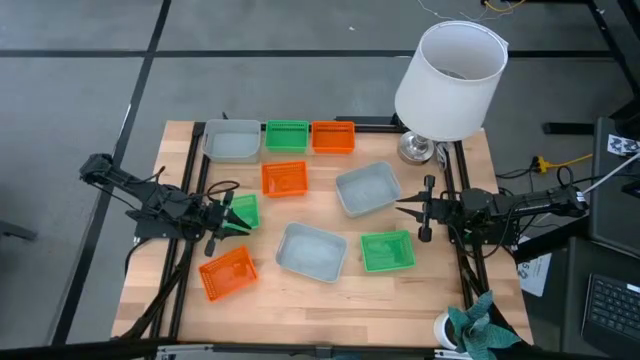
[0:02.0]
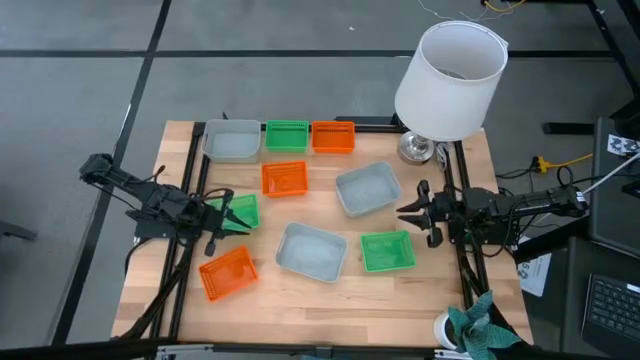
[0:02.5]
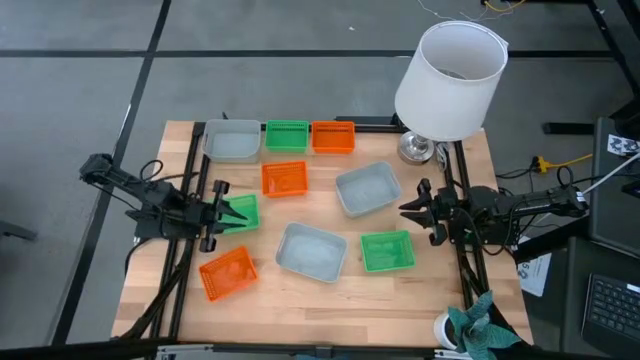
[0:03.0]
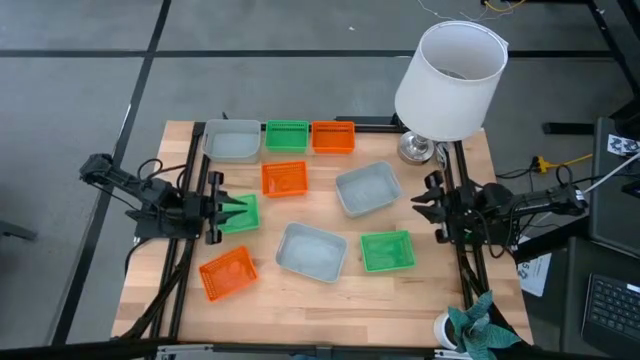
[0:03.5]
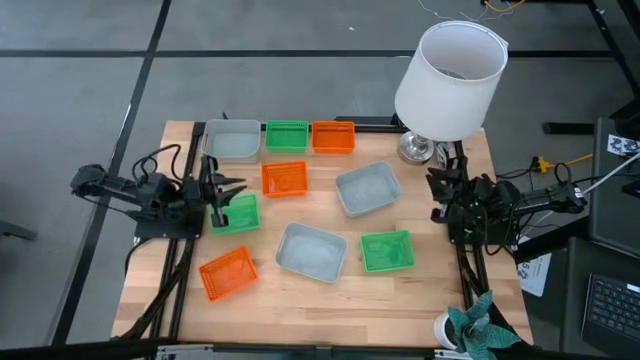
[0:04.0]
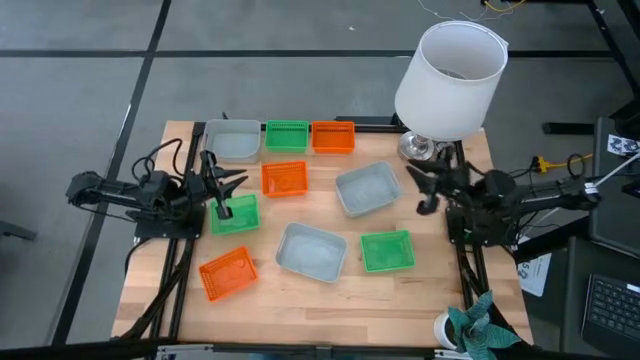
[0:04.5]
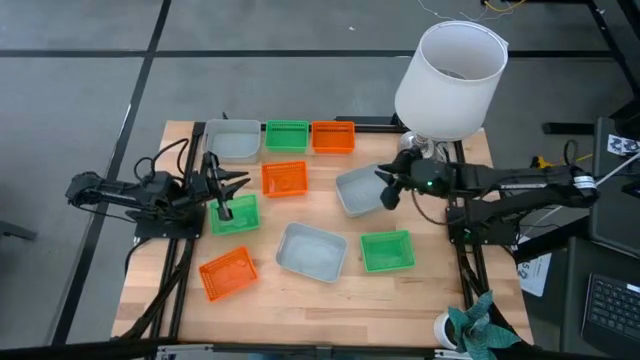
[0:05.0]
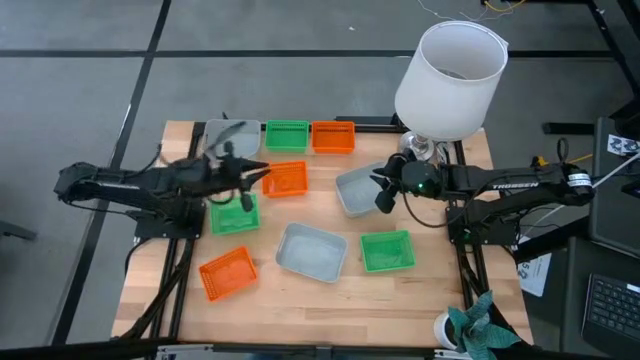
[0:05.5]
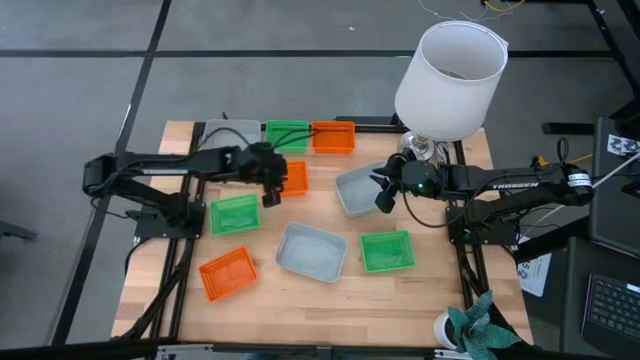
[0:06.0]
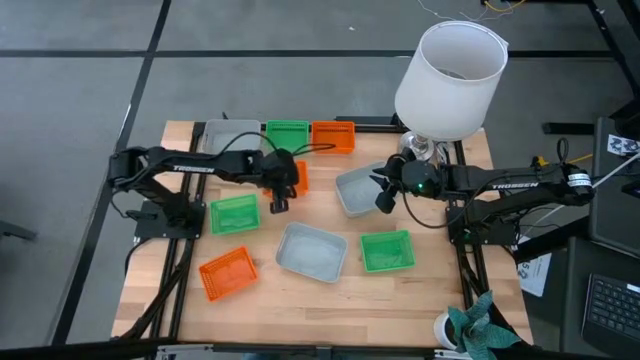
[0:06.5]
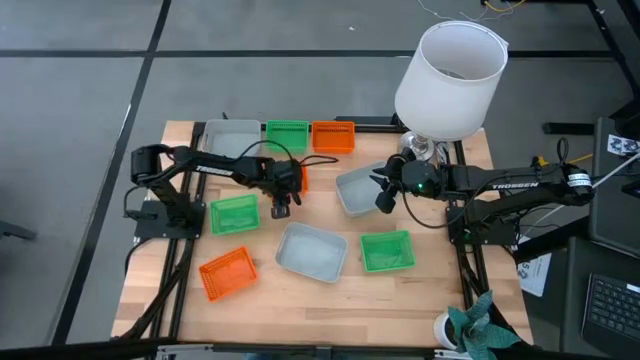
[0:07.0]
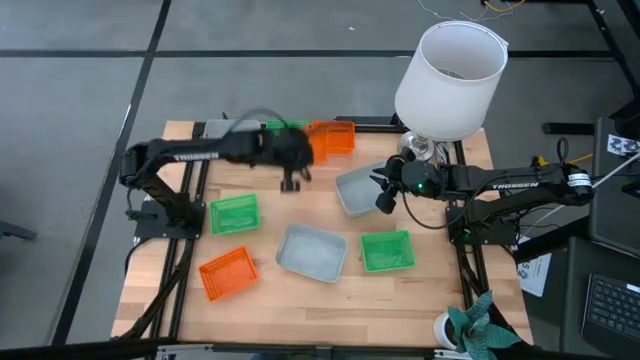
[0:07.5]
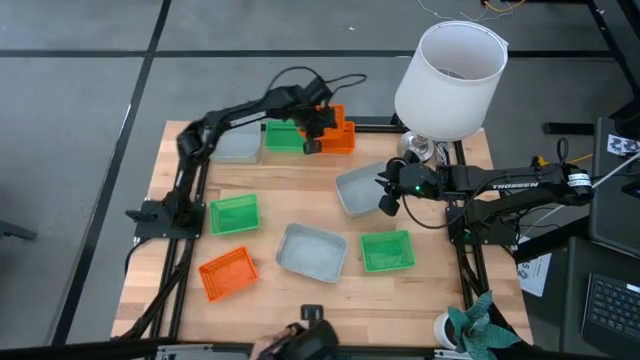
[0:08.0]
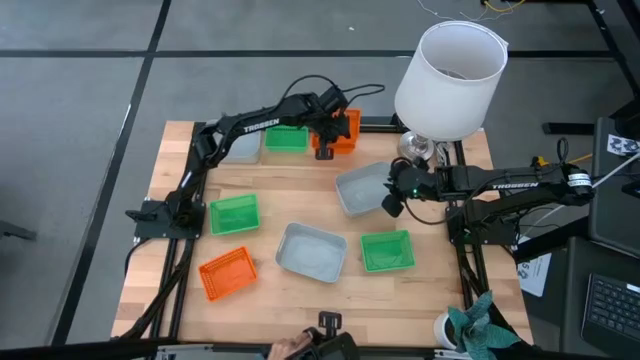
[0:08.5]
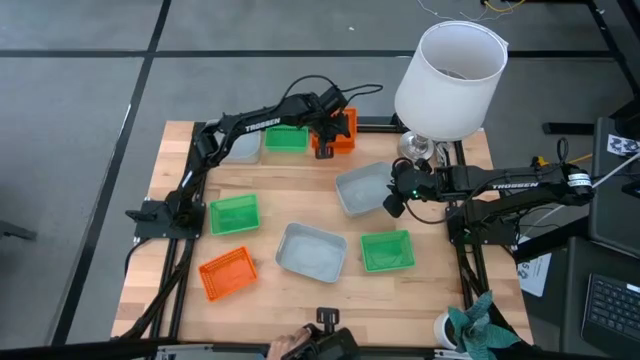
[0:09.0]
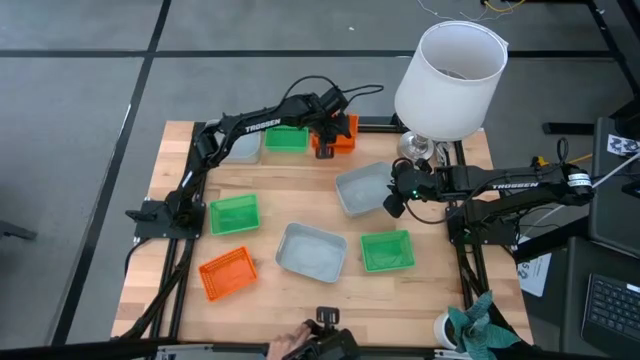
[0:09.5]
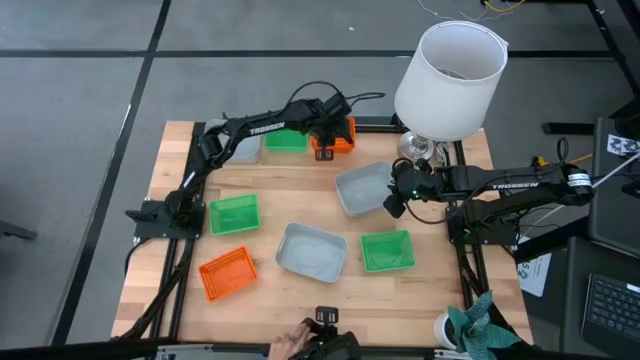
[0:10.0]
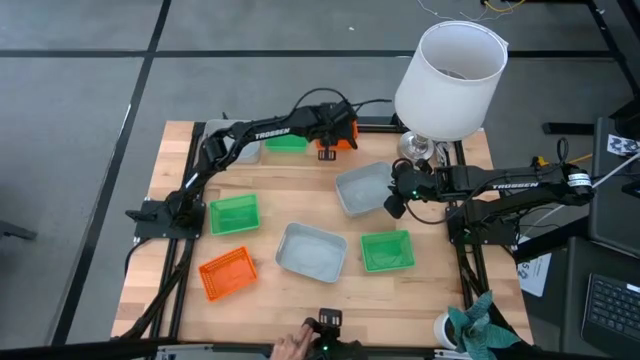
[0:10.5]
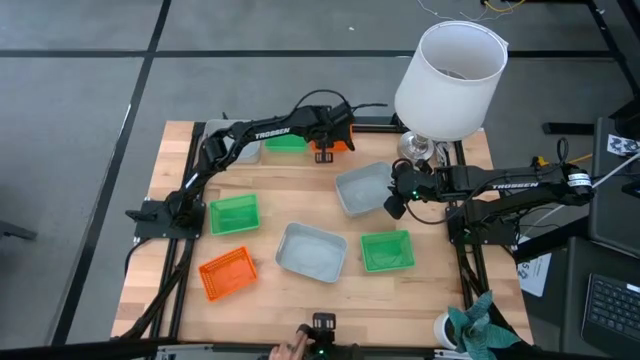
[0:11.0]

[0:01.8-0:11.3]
Stack the middle orange bin into the top orange bin

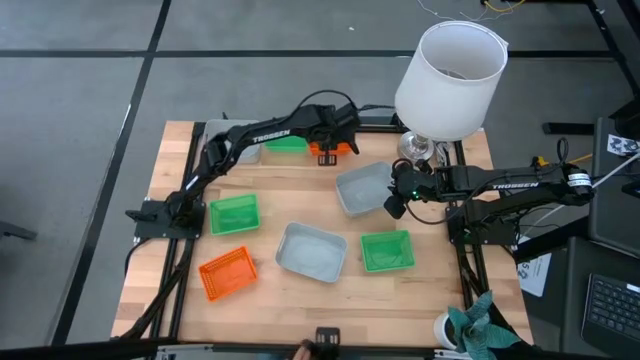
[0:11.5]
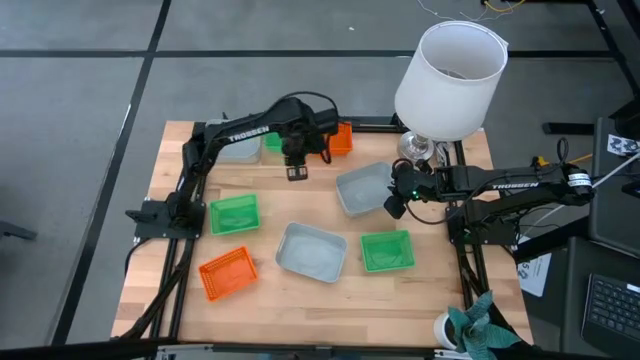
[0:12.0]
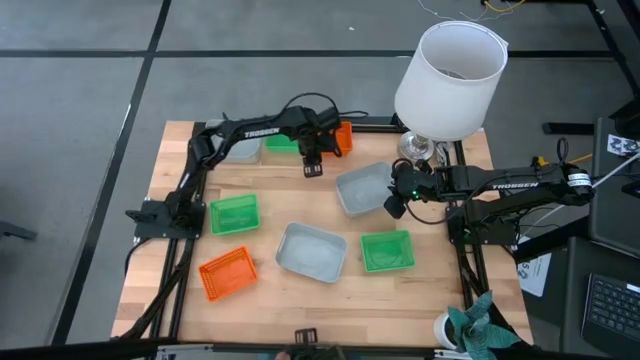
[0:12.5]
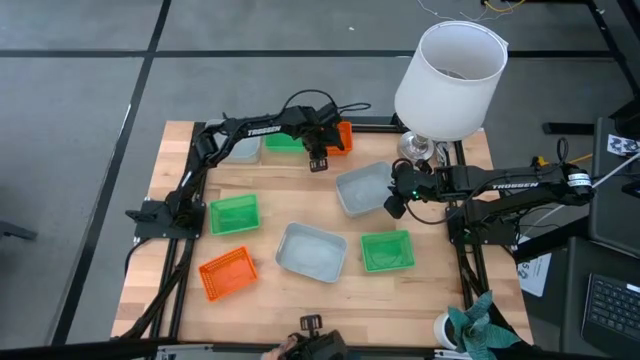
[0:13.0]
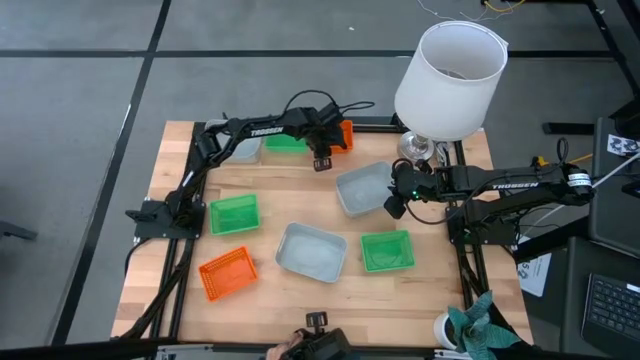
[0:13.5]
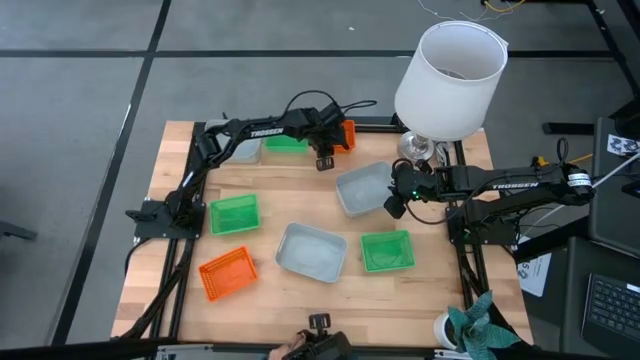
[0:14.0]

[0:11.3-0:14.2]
Adjust the orange bins

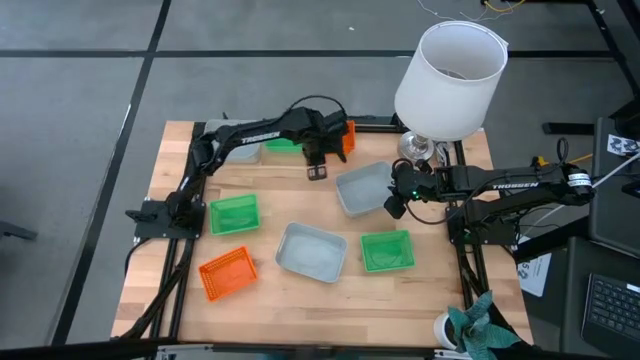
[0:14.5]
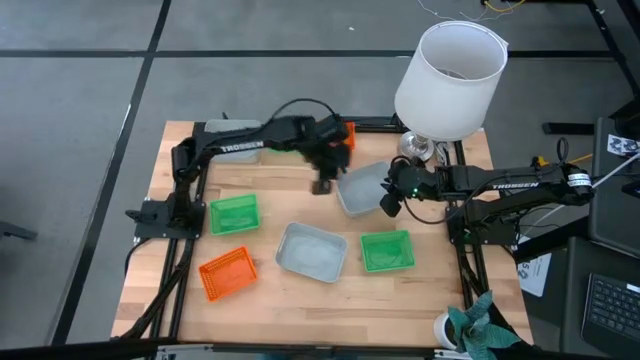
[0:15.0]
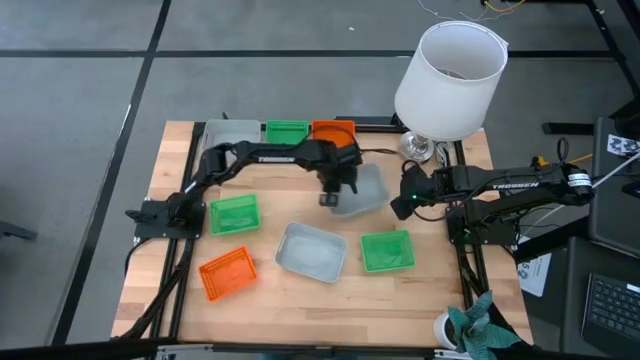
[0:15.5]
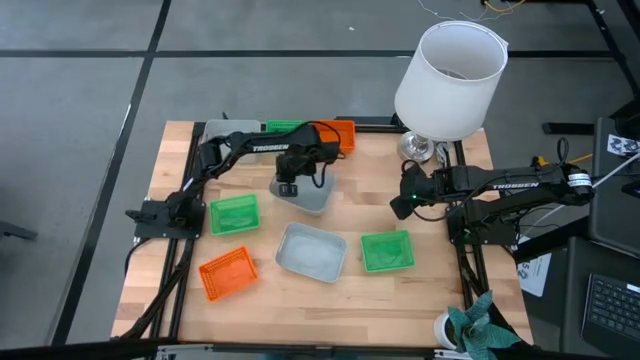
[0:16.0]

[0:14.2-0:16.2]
Adjust the gray bin on the middle

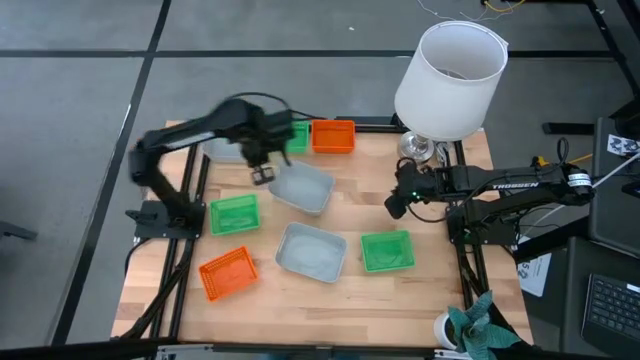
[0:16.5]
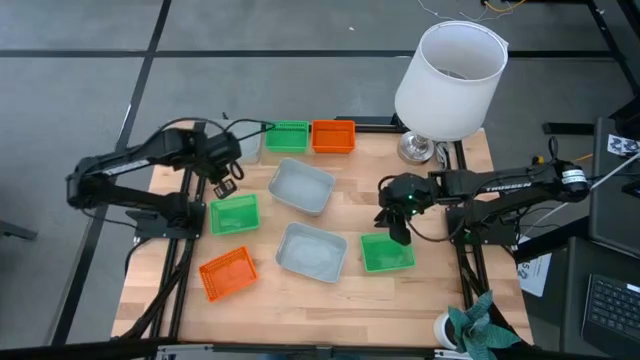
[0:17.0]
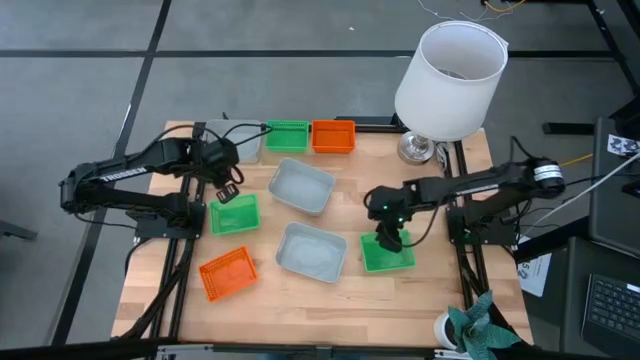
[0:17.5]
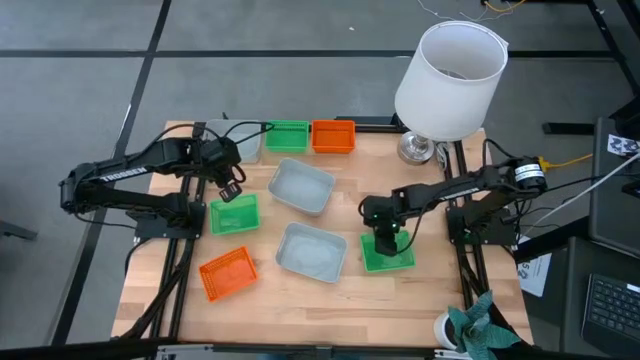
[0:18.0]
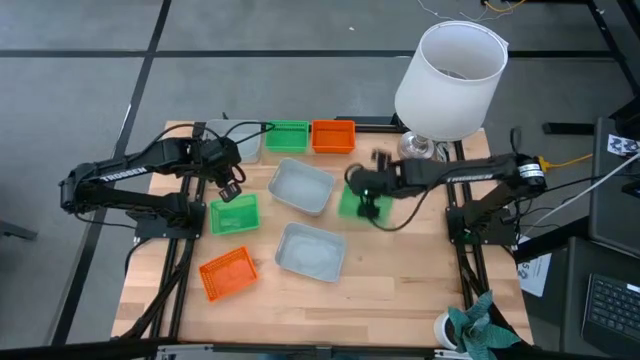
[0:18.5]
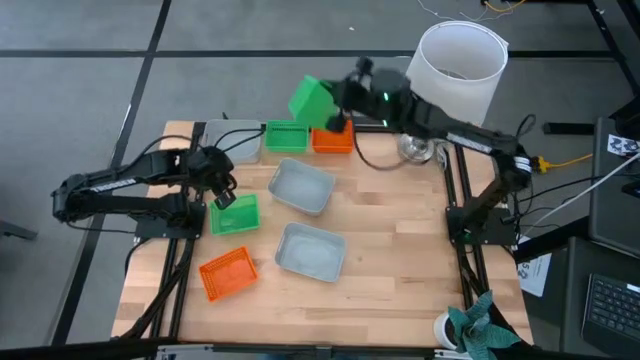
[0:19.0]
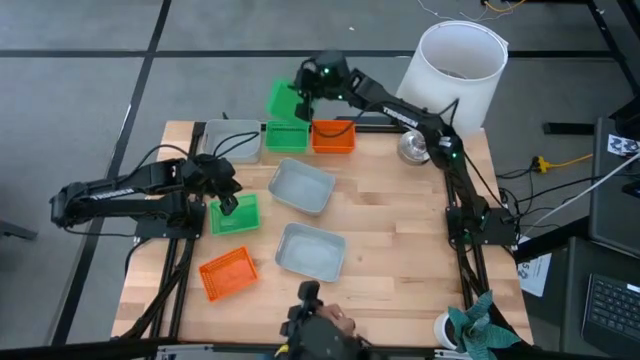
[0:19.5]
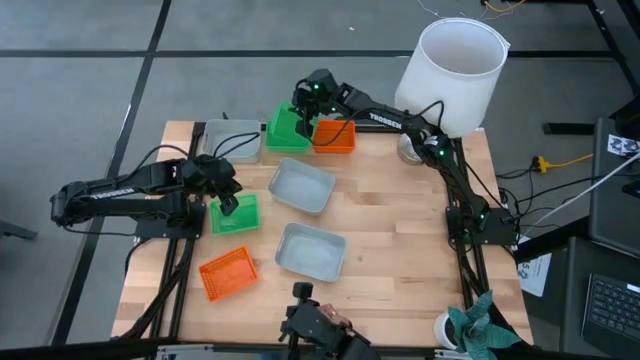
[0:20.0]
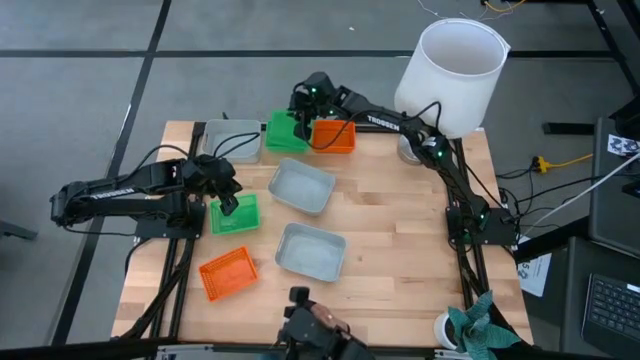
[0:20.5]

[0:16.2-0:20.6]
Stack the bottom green bin into the top green bin
